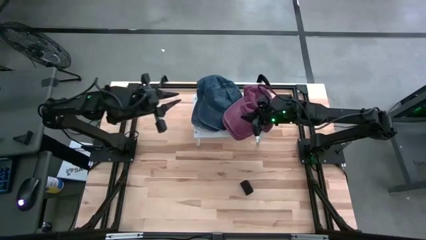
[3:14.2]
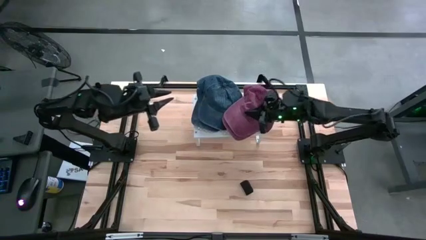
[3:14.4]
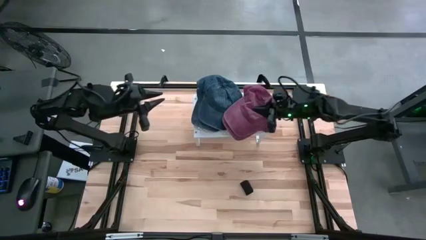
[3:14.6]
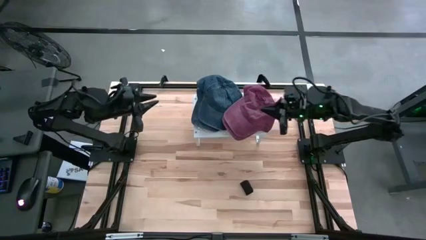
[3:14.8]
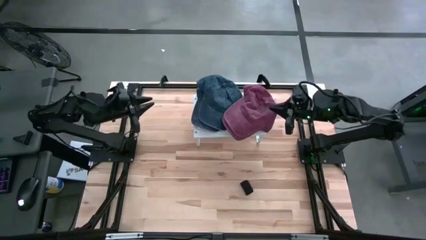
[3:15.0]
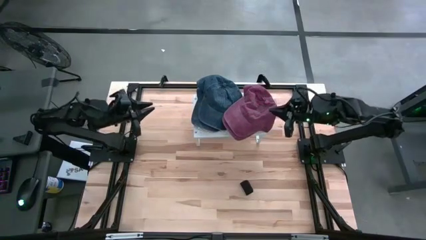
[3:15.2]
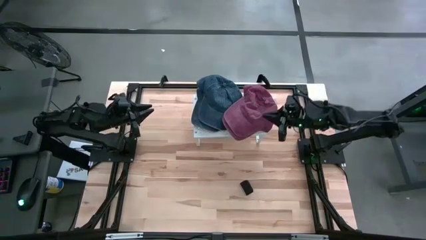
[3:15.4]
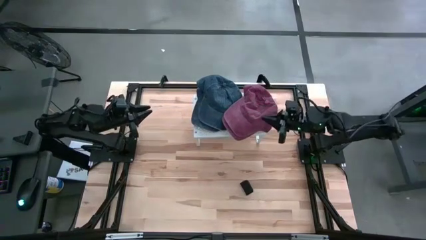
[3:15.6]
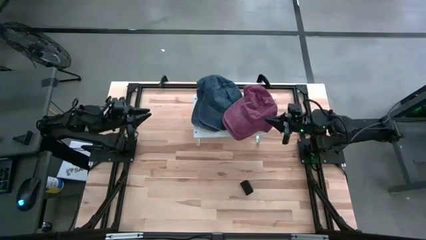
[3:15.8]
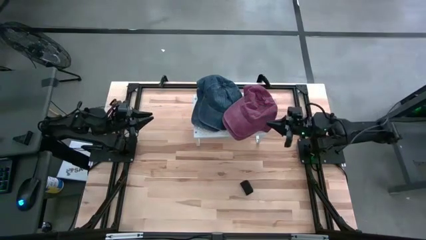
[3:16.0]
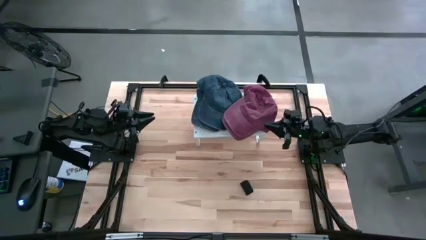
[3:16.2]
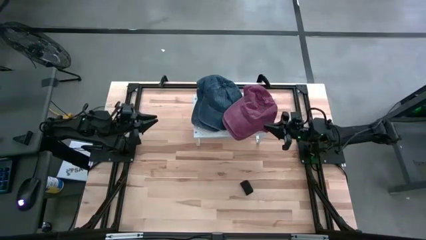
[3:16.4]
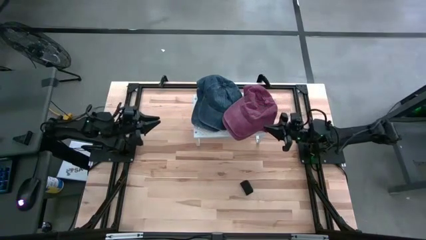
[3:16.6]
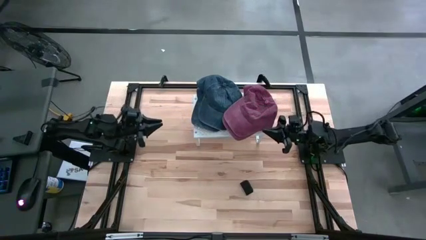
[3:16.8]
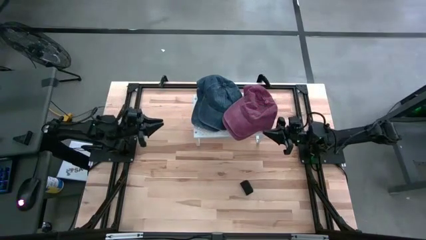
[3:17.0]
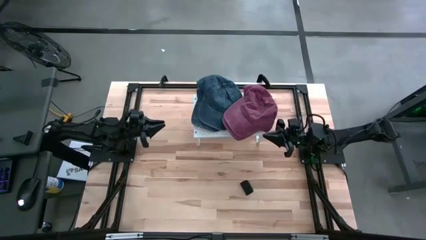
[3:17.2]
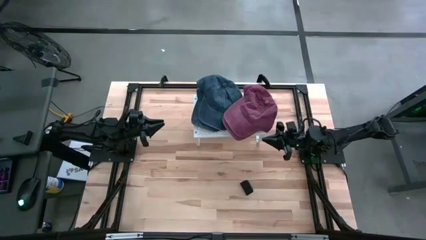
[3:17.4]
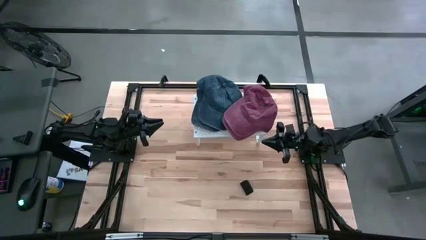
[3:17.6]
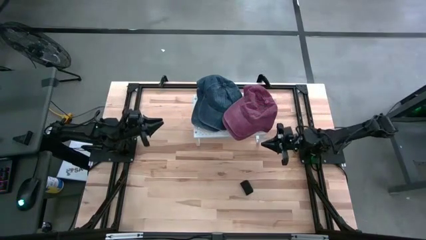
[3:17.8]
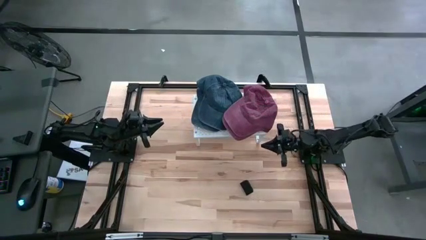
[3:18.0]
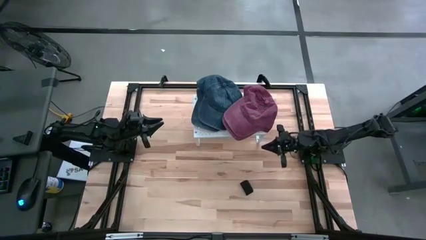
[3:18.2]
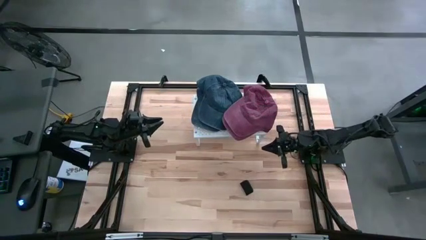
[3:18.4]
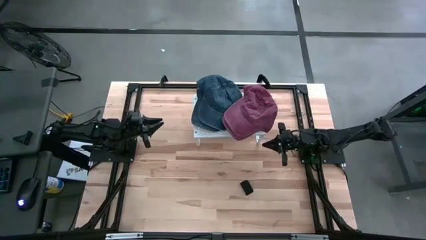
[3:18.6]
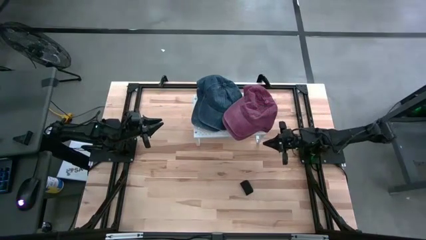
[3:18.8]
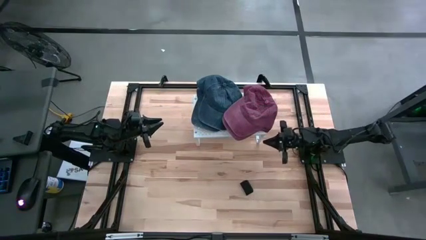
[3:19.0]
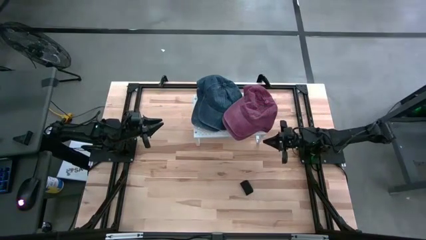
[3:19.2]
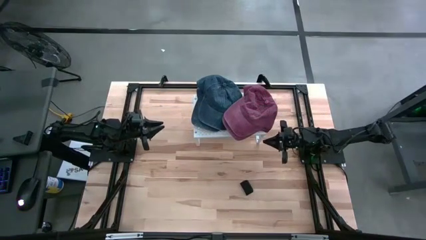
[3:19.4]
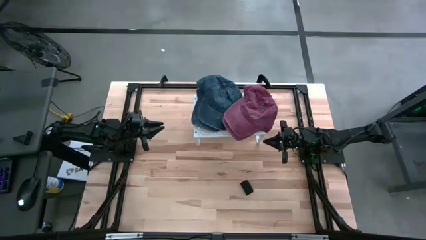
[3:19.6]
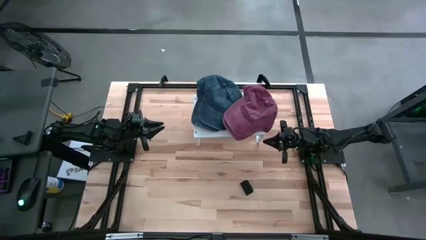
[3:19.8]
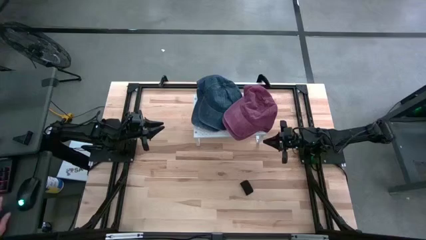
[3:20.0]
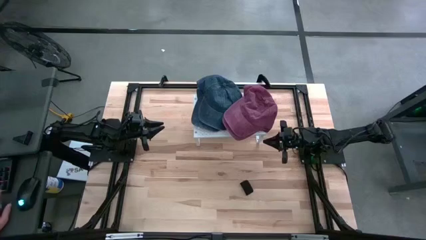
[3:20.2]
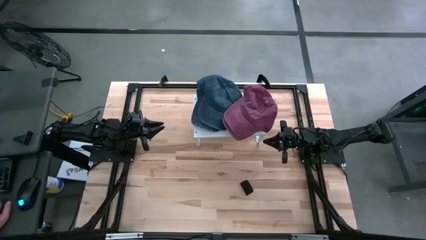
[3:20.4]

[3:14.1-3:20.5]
Task: Pick & Place hat
Return to Home Position

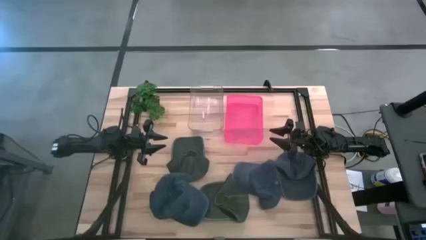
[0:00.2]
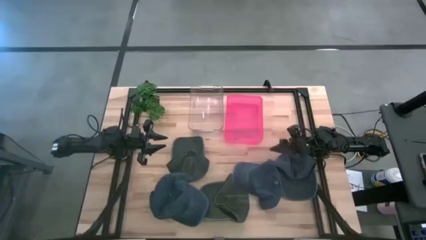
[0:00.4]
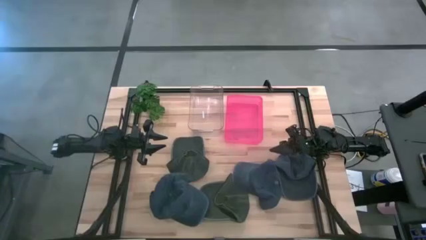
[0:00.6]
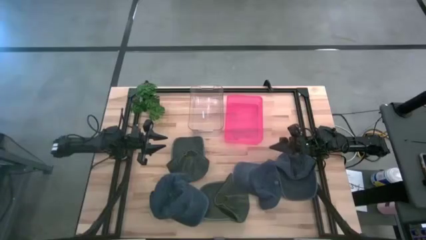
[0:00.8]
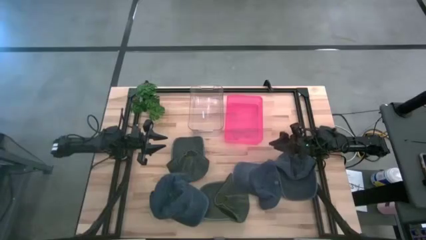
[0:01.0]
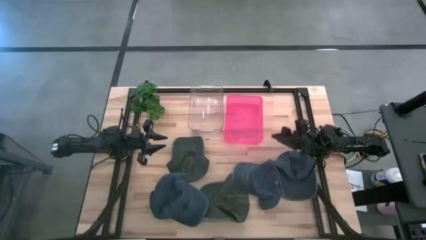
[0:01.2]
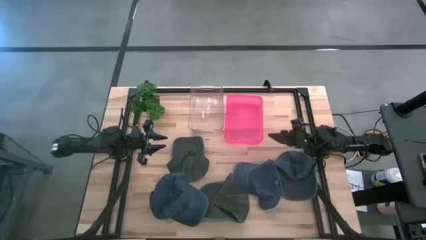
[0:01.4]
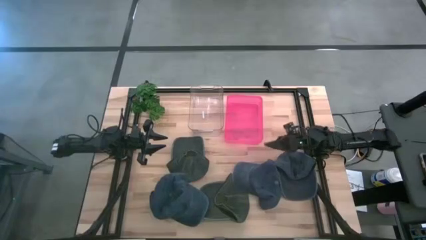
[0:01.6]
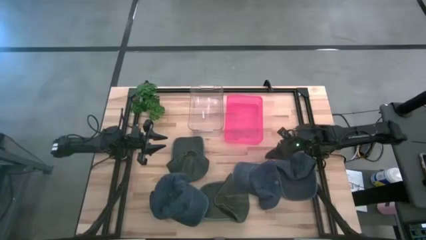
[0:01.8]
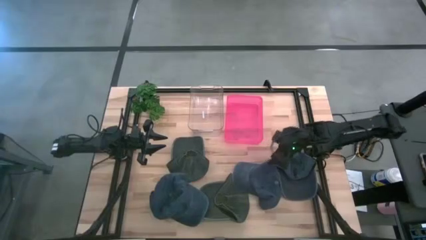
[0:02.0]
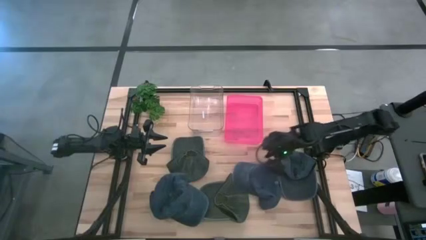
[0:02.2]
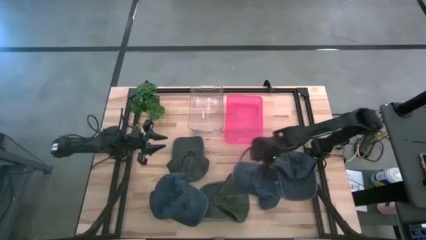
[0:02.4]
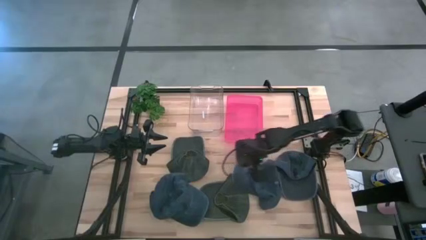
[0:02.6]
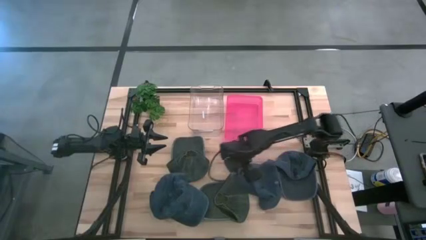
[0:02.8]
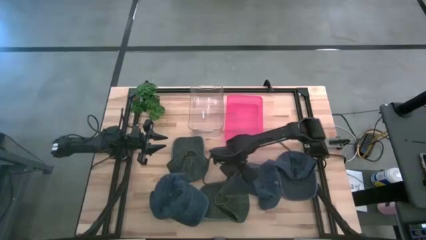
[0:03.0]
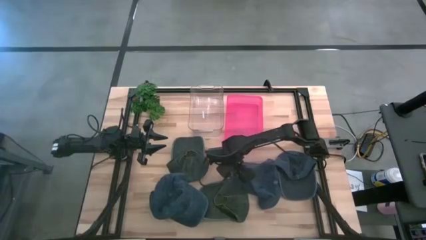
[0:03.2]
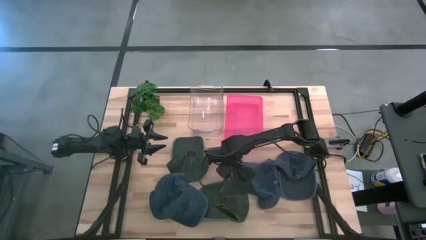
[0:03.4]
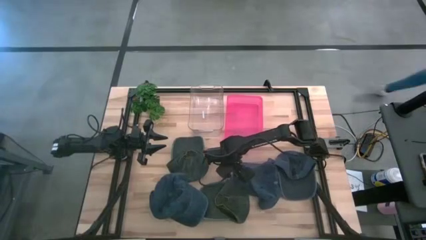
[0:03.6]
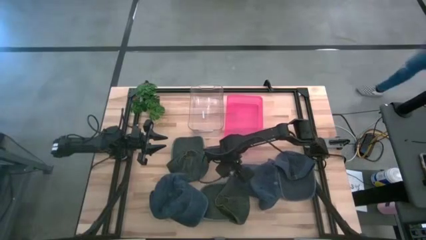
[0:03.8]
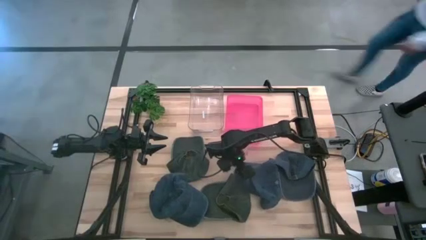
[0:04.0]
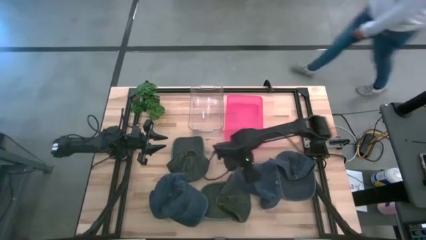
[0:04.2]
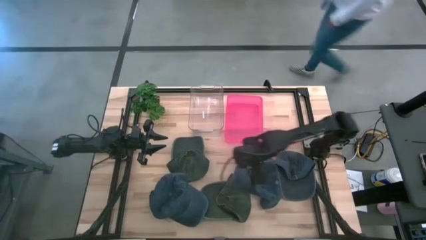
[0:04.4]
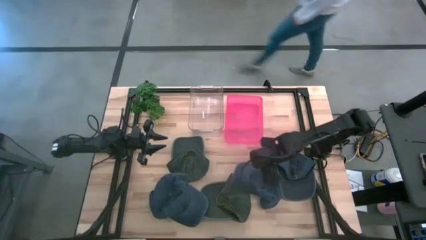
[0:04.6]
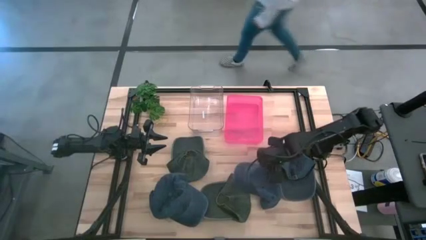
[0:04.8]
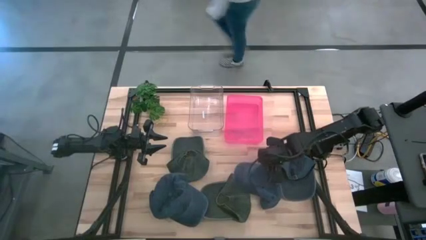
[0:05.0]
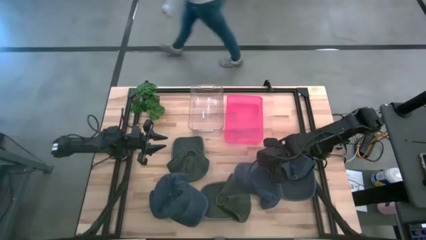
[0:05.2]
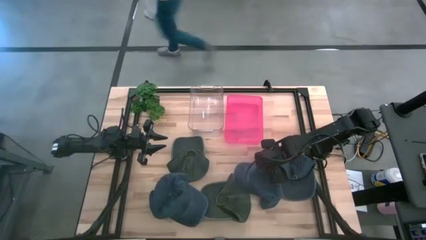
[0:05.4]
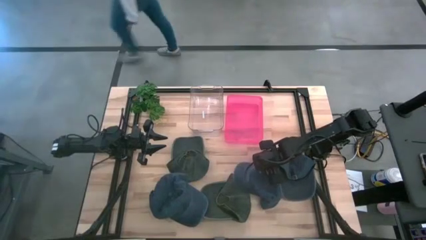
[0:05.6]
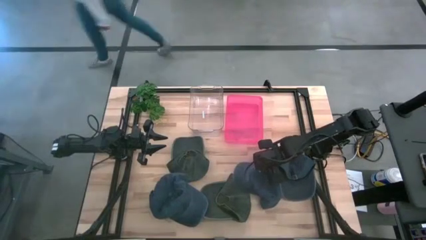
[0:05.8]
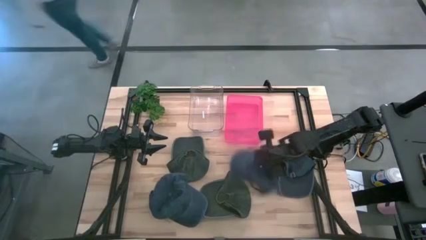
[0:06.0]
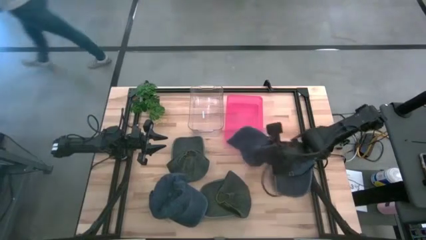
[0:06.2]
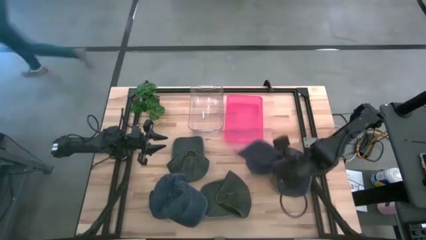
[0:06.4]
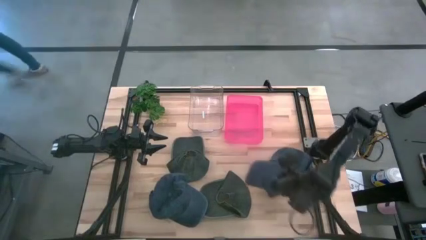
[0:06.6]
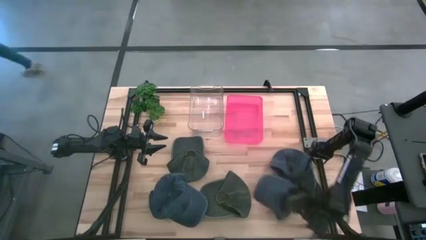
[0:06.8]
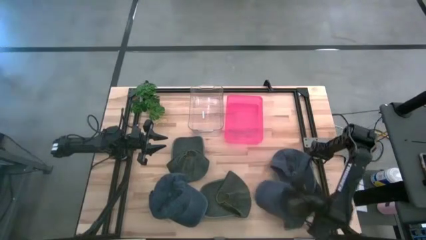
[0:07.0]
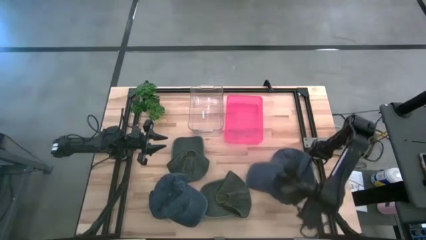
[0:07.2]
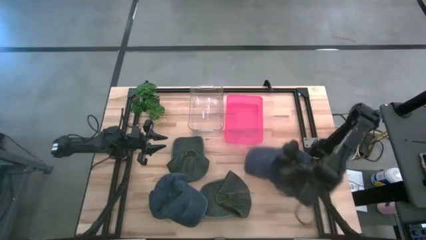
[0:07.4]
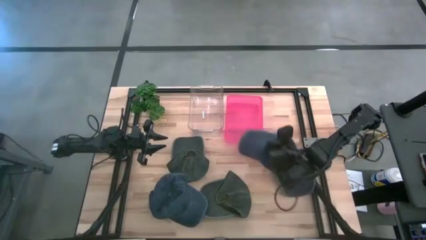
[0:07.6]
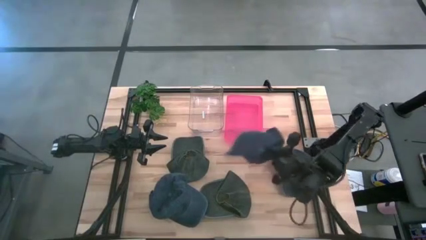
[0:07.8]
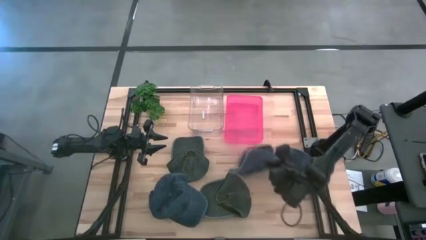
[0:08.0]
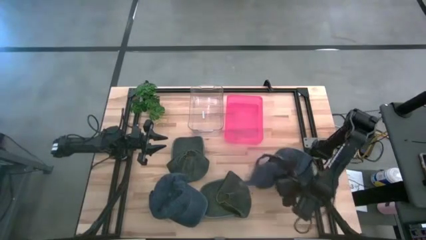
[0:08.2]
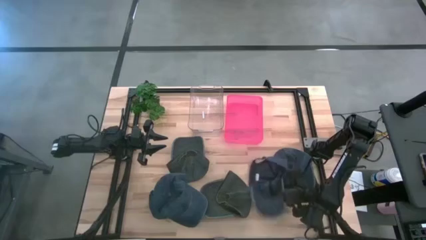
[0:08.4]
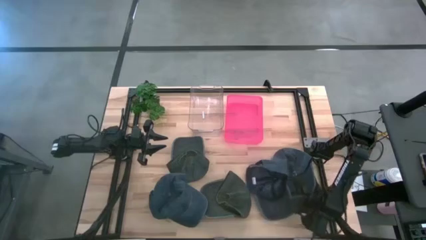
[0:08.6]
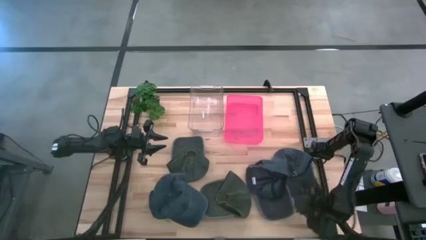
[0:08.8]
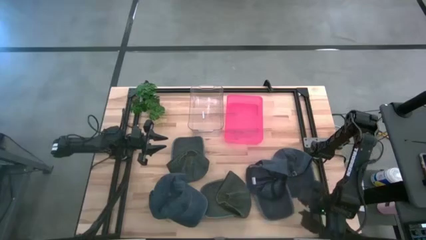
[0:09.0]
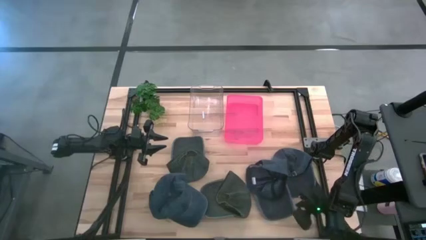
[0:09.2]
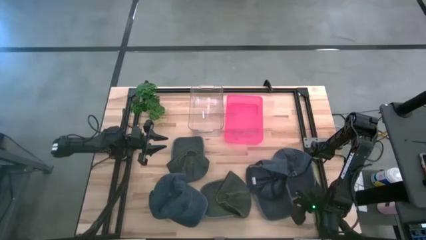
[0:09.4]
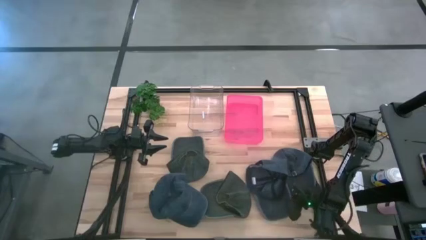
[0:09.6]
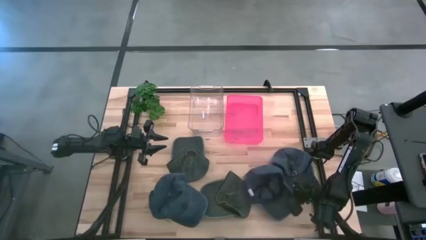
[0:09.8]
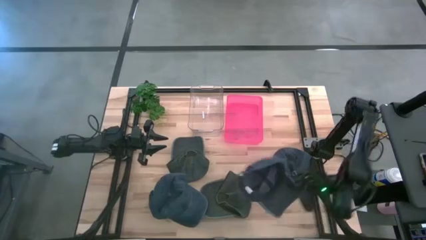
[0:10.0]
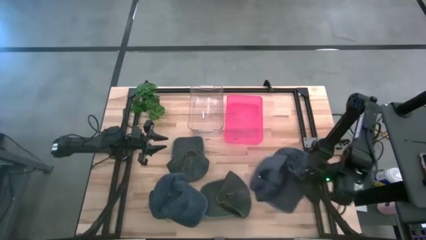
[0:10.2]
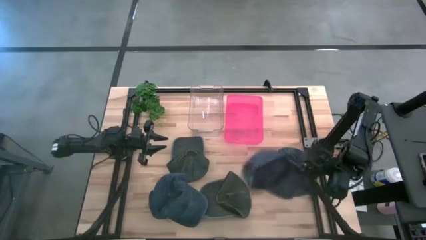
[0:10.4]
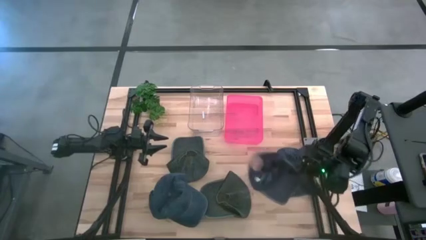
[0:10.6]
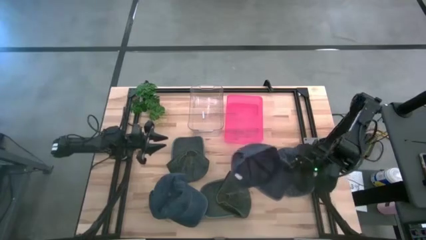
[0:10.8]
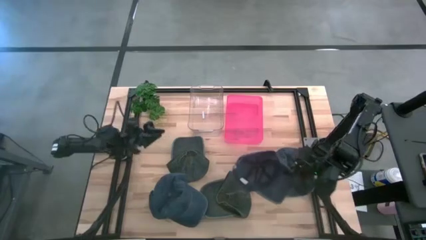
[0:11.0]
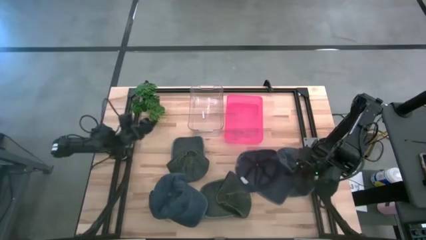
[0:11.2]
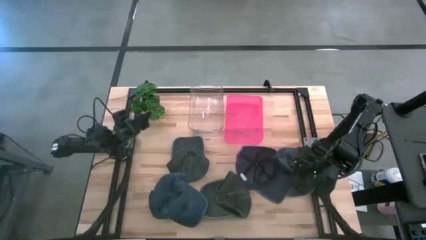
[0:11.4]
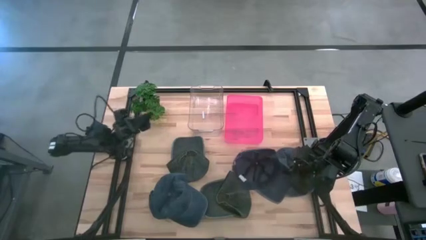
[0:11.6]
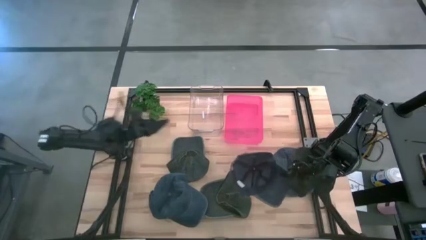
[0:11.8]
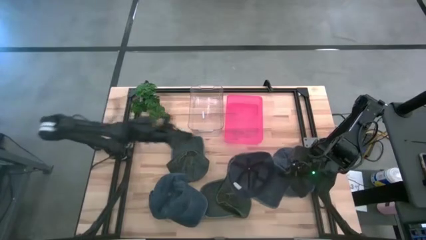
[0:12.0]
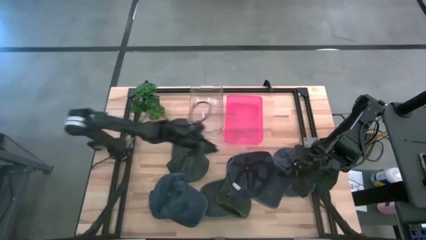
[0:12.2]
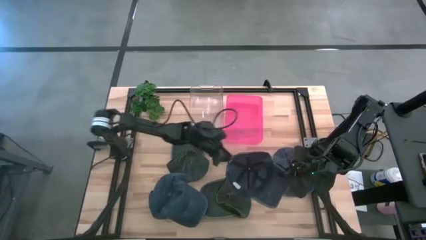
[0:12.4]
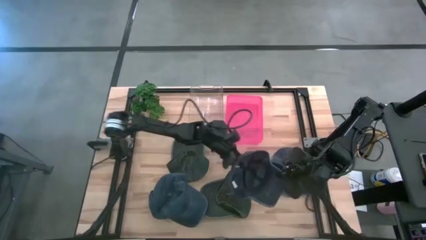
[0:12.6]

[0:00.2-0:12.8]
Task: Pick & Place hat
Put the middle blue cap into the transparent bin
